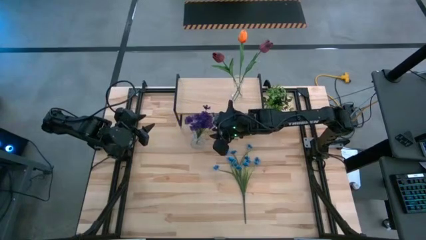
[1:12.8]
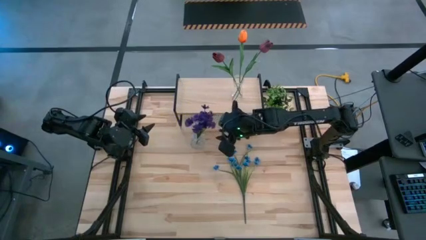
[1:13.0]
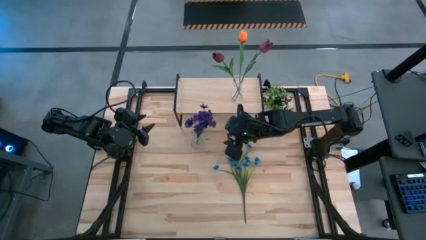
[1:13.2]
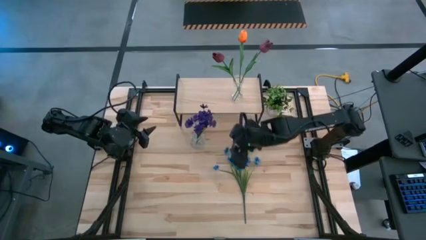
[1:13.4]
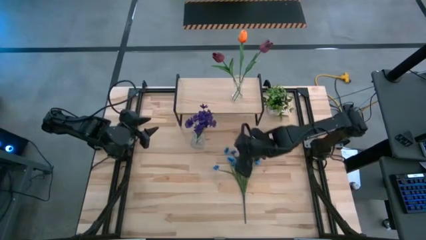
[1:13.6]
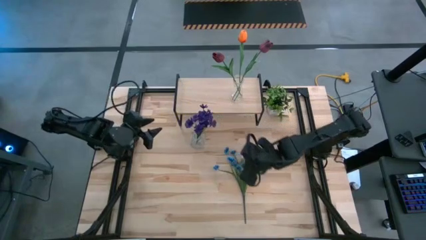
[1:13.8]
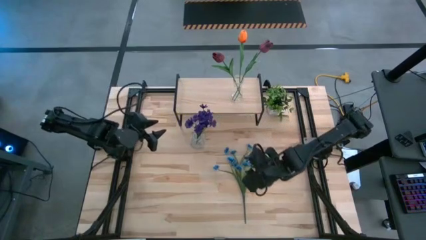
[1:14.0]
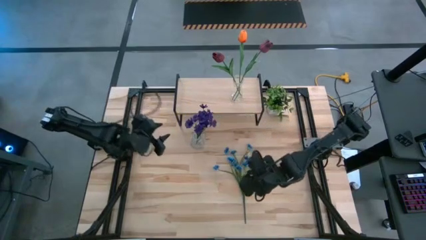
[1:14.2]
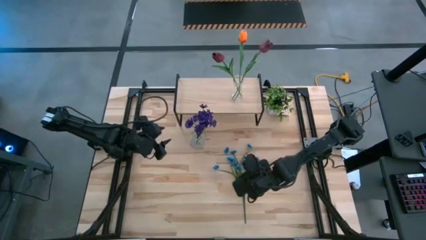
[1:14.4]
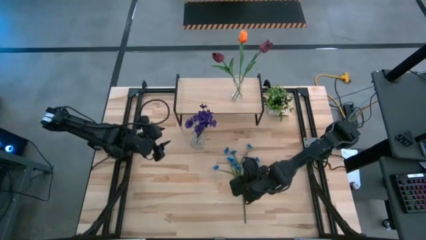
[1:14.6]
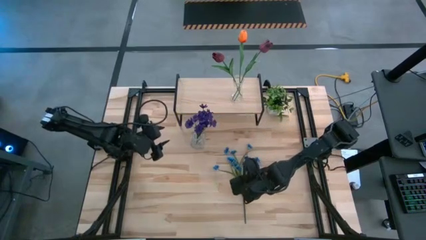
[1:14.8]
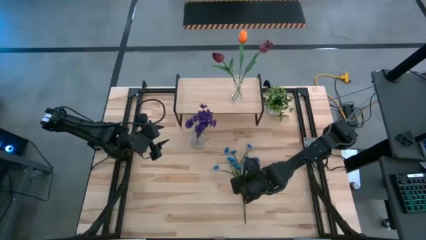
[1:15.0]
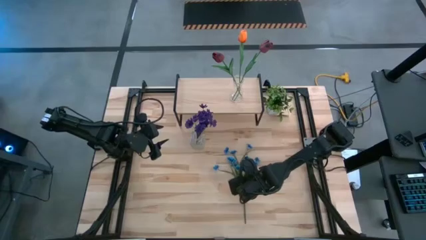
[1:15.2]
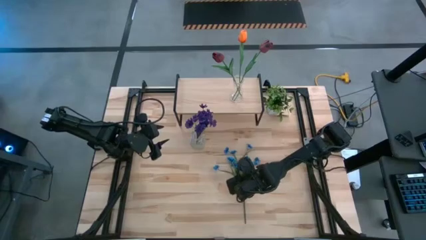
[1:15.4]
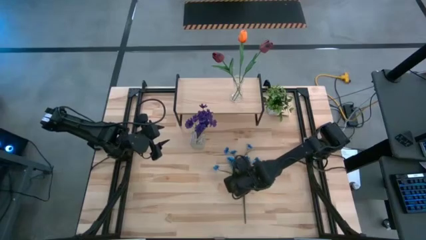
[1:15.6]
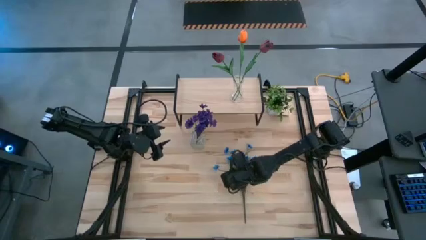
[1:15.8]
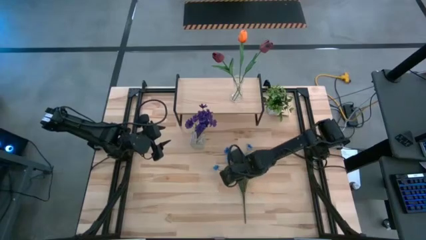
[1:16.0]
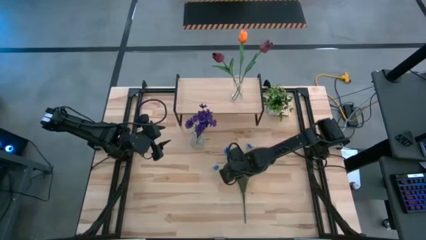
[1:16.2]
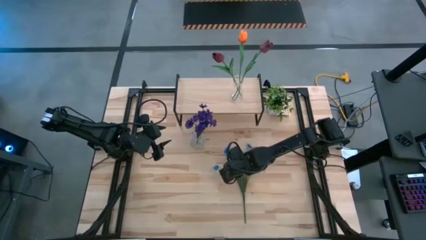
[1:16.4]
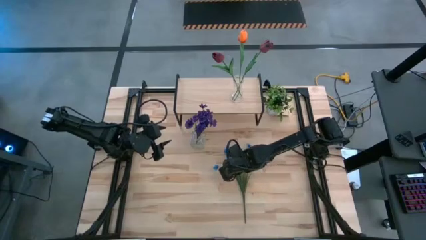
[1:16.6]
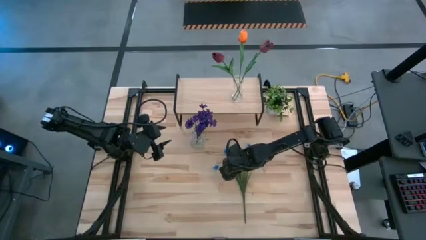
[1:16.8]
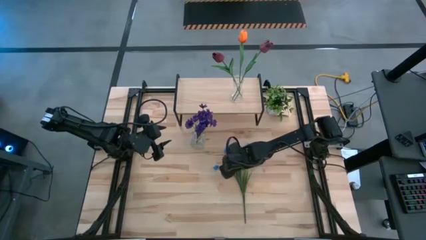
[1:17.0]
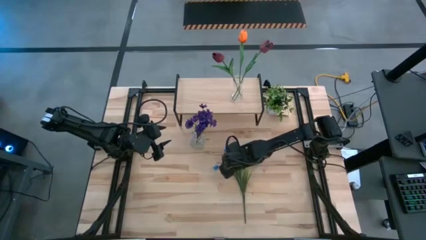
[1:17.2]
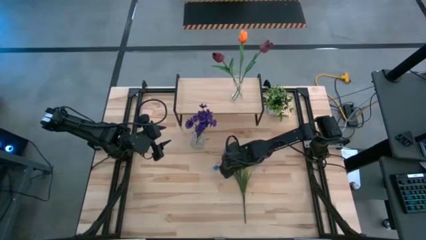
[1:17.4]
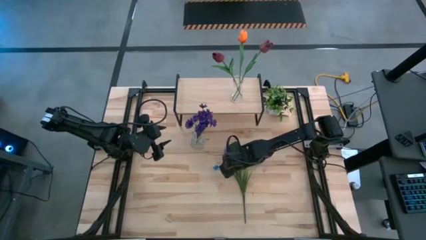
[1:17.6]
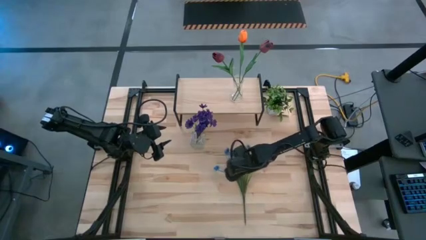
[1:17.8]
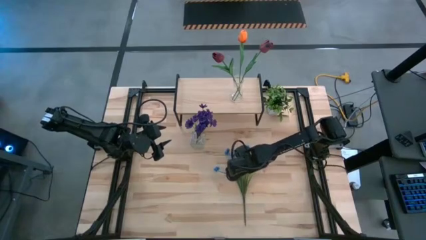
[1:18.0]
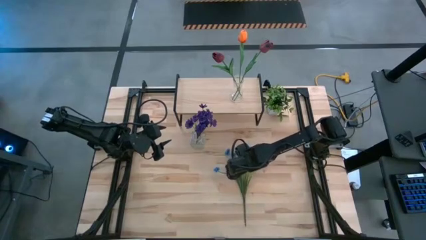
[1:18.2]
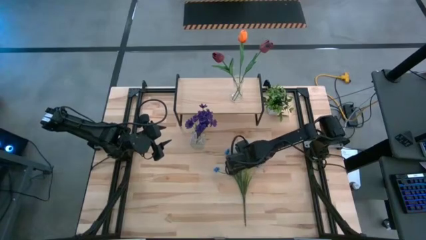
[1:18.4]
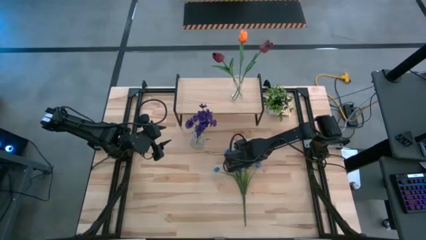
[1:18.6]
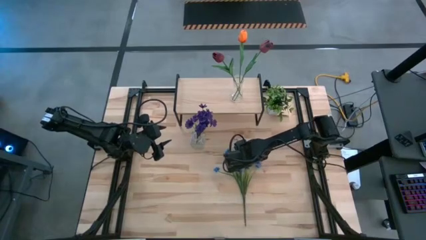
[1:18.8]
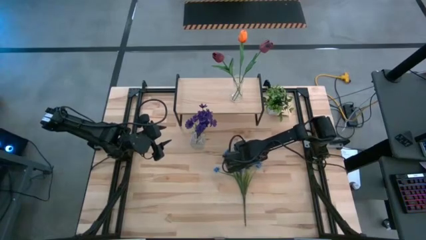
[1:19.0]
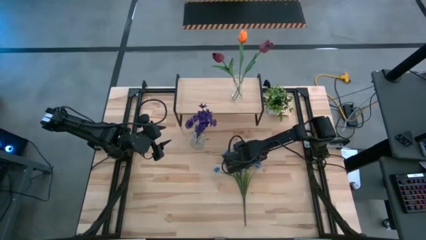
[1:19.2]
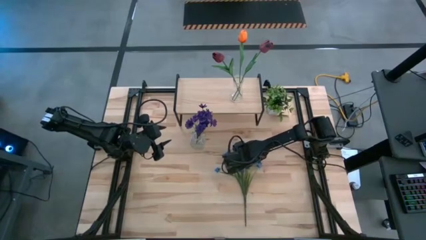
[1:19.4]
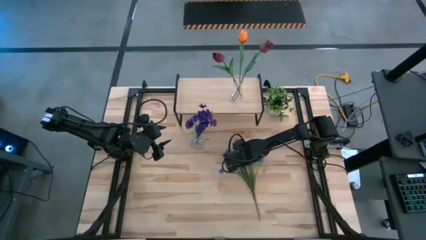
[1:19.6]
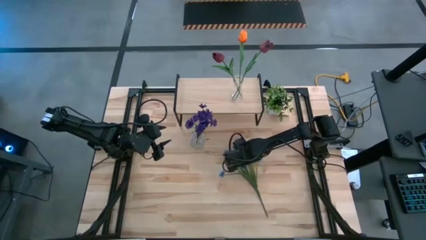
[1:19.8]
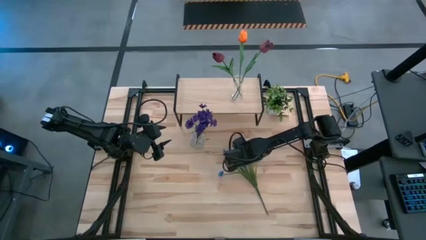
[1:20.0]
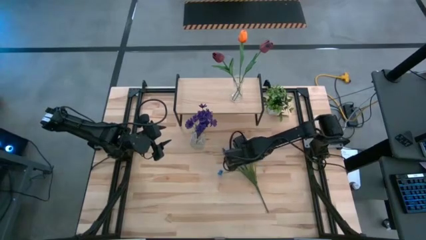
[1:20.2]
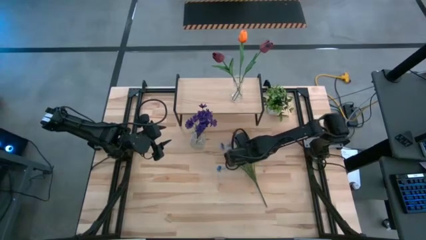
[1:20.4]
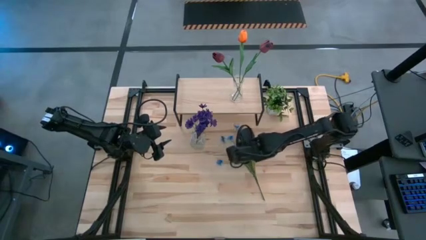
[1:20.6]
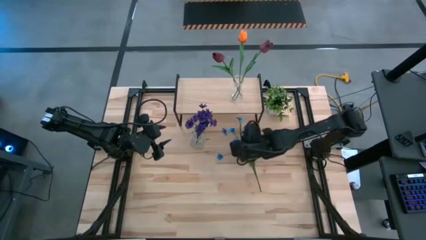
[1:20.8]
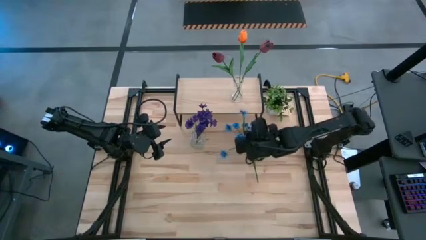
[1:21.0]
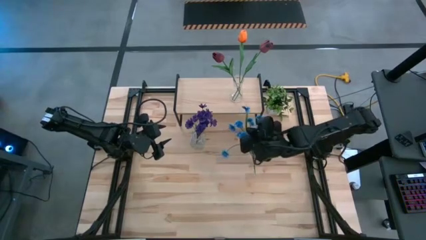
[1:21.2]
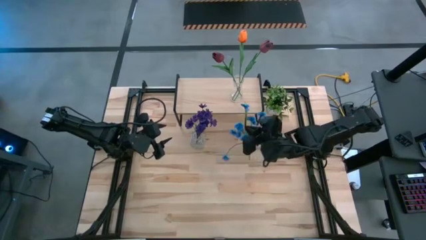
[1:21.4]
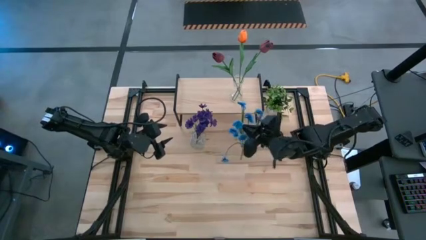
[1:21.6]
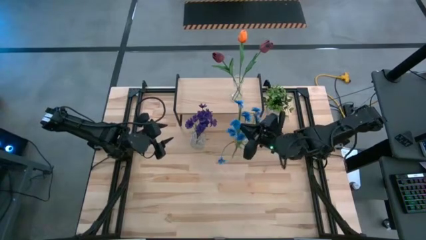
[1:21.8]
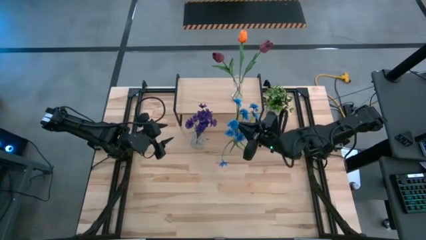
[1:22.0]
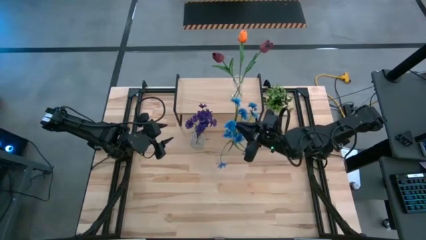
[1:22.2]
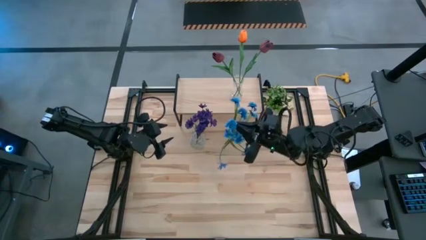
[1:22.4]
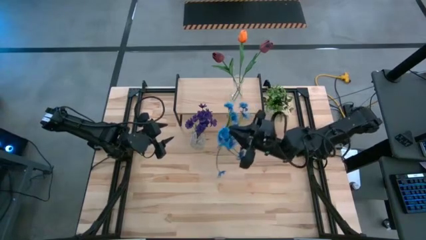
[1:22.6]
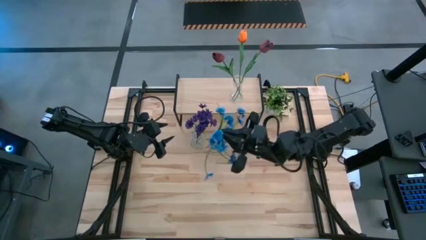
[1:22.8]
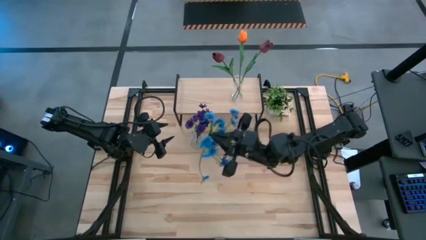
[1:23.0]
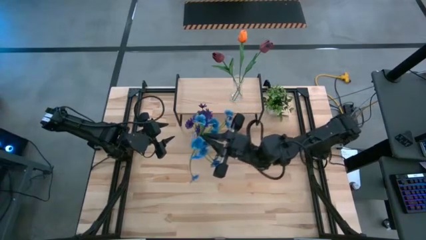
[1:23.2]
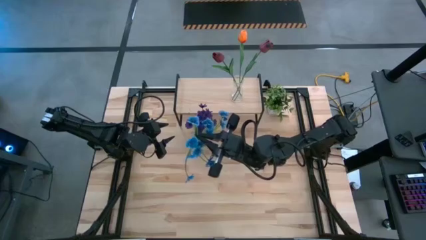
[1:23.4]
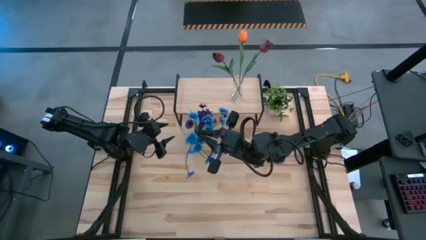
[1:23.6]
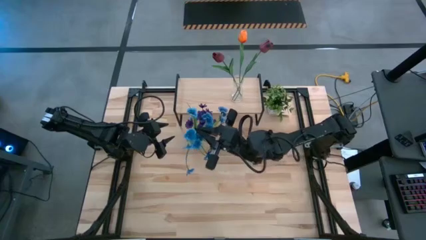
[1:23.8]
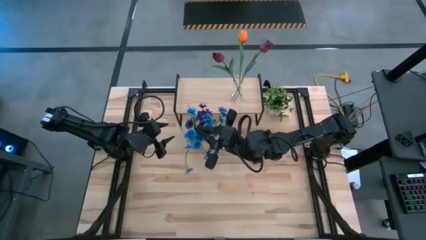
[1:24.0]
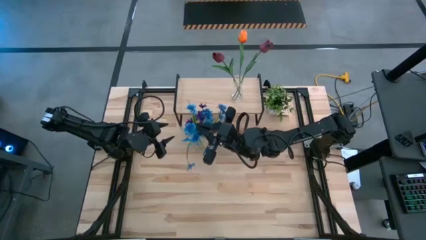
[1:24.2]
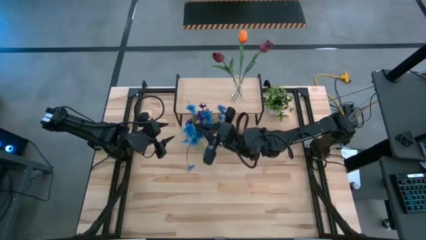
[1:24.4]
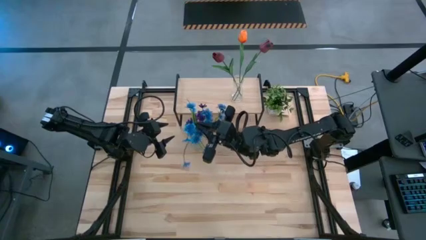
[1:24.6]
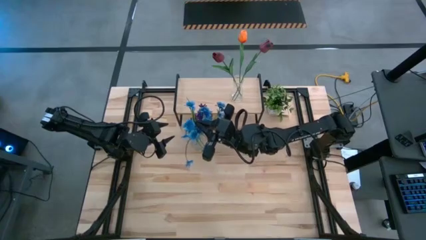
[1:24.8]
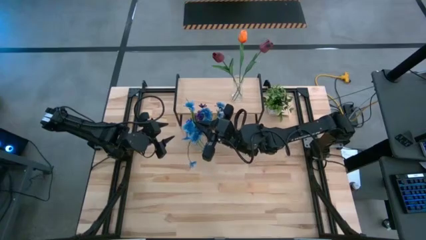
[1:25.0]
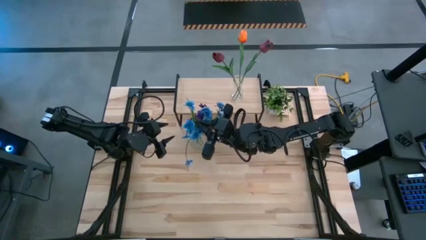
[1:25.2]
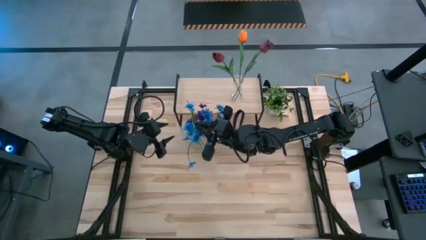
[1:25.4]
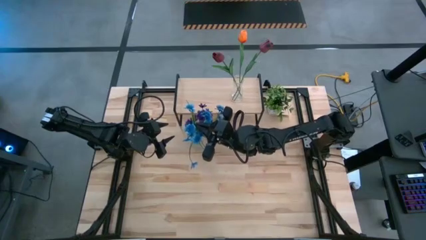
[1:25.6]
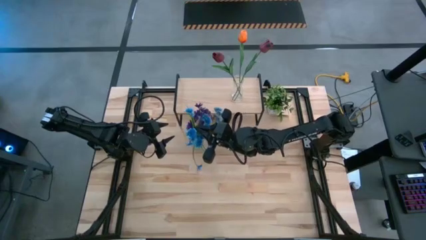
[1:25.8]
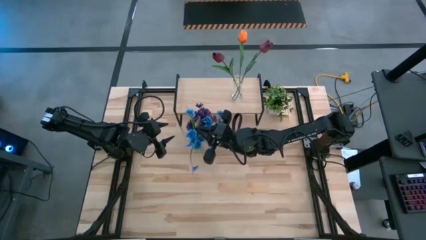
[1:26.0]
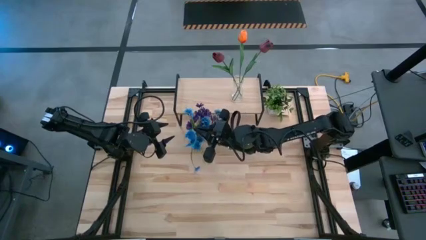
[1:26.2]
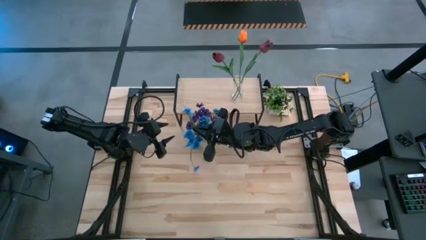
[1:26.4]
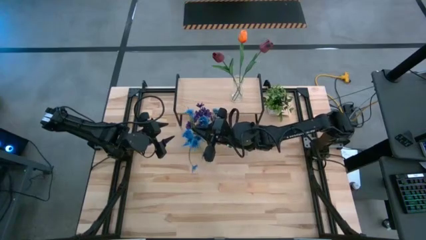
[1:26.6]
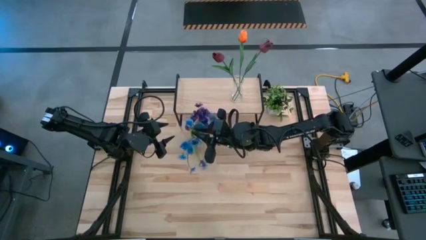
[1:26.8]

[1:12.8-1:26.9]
Task: Pick and place flowers into a vace then onto a shelf
Put the blue flowers into the left transparent vase
